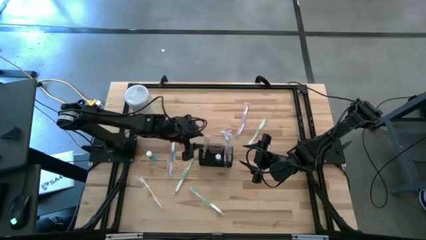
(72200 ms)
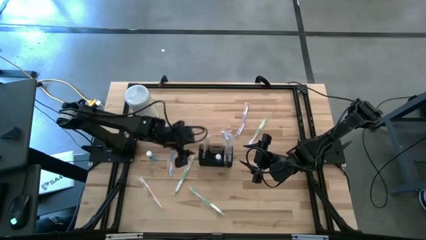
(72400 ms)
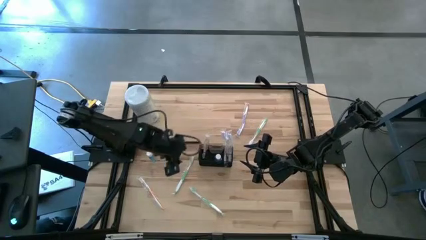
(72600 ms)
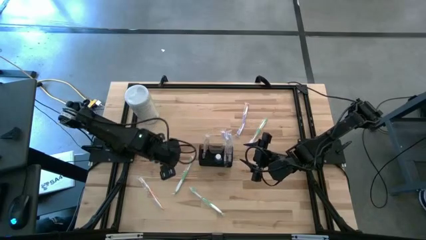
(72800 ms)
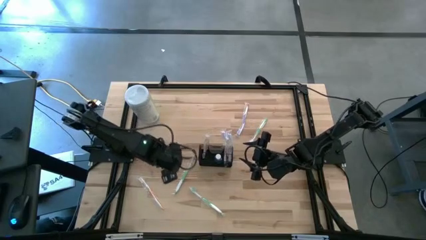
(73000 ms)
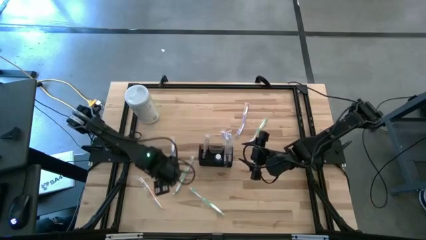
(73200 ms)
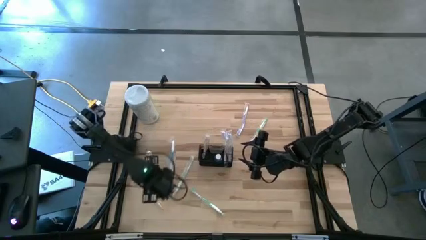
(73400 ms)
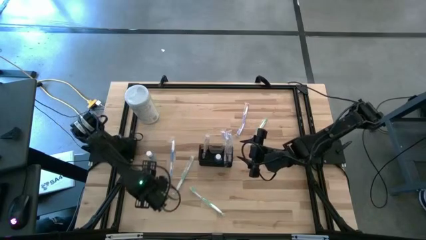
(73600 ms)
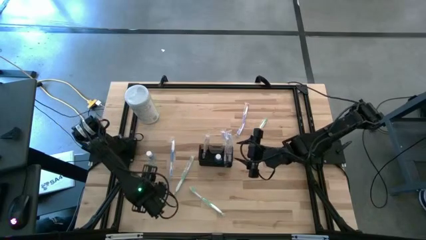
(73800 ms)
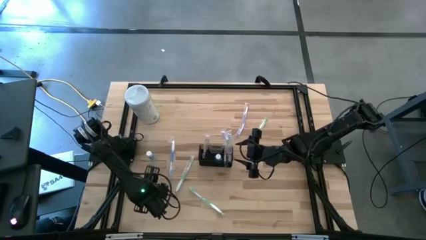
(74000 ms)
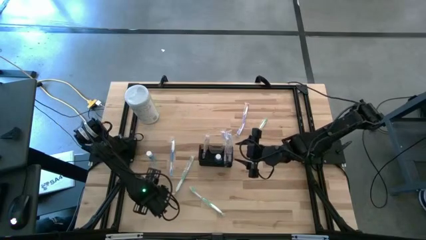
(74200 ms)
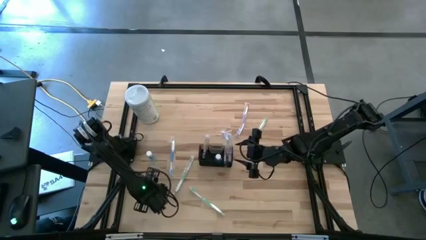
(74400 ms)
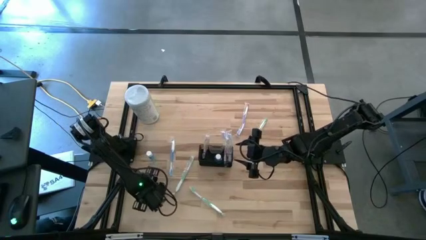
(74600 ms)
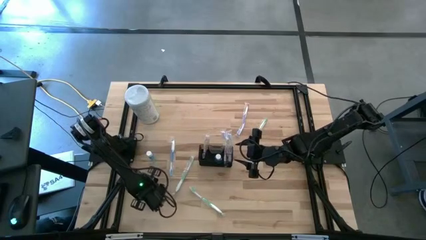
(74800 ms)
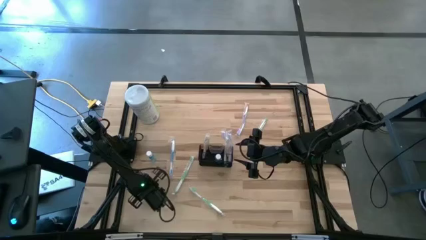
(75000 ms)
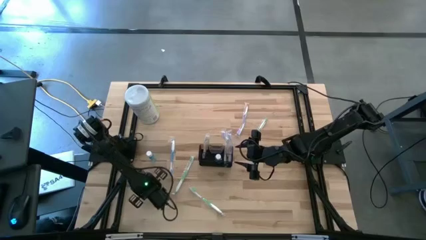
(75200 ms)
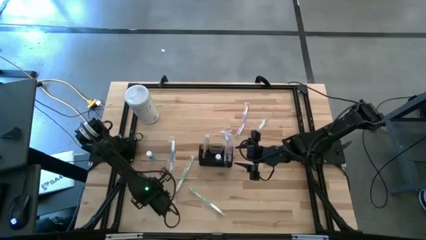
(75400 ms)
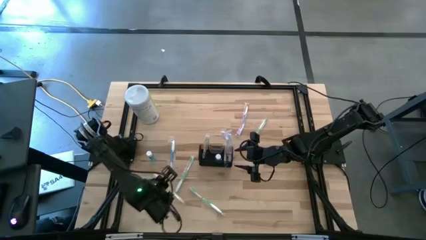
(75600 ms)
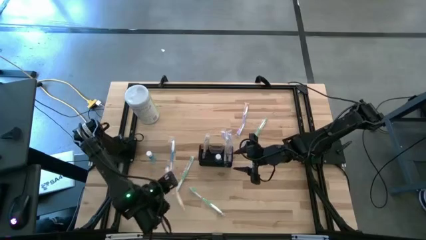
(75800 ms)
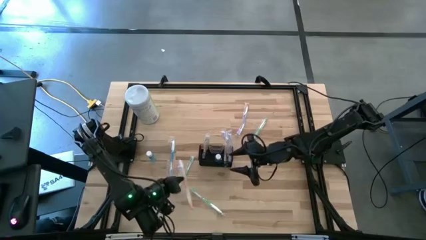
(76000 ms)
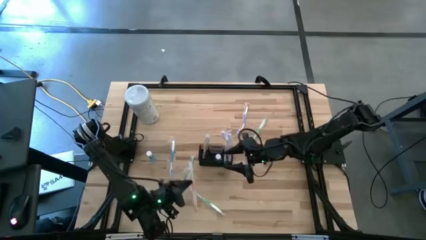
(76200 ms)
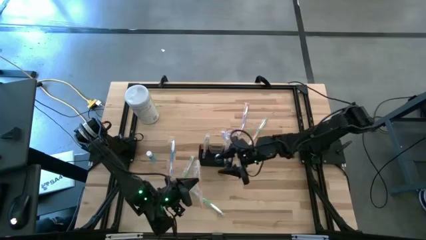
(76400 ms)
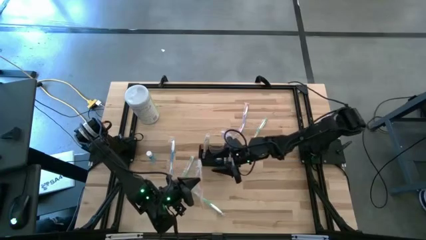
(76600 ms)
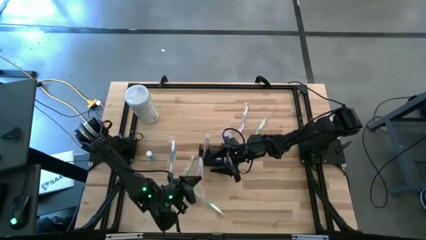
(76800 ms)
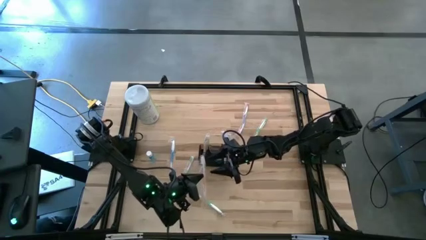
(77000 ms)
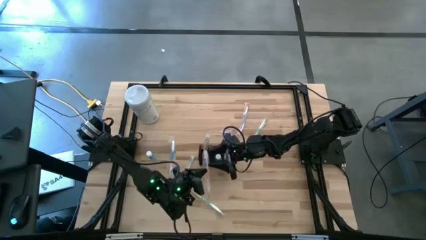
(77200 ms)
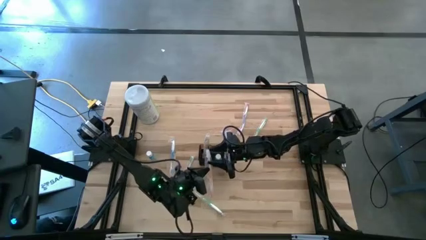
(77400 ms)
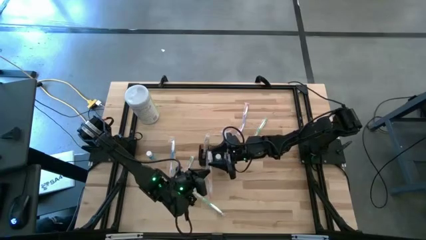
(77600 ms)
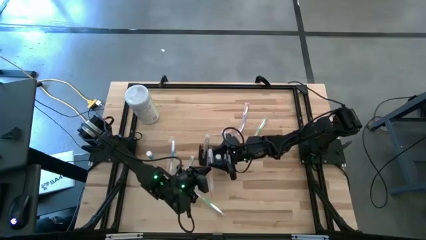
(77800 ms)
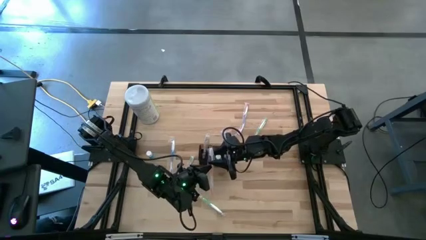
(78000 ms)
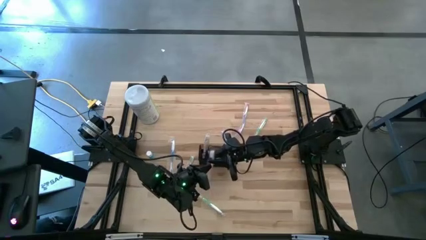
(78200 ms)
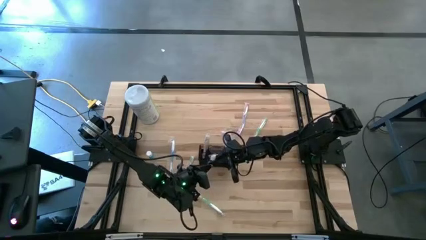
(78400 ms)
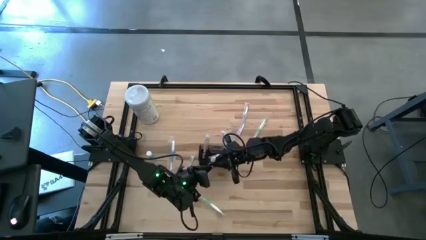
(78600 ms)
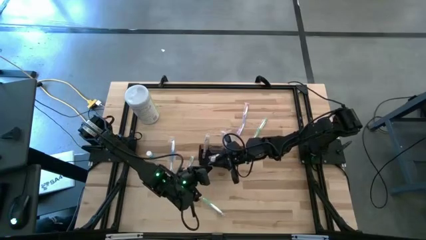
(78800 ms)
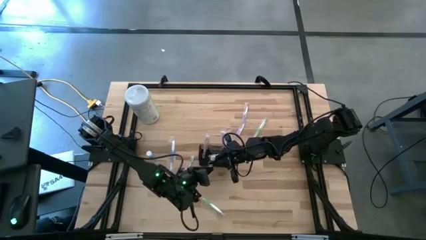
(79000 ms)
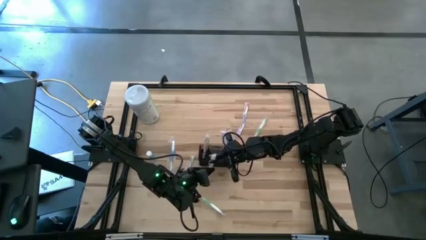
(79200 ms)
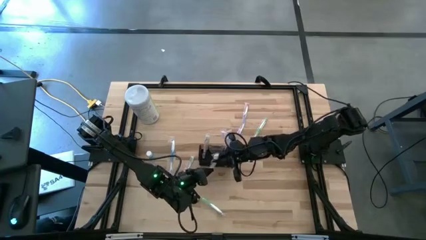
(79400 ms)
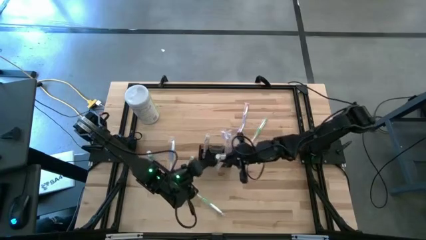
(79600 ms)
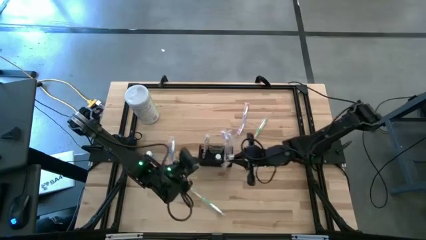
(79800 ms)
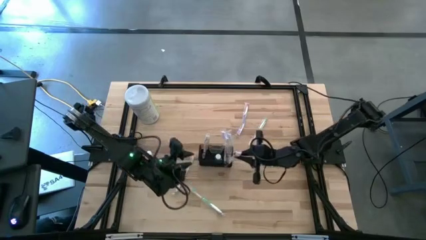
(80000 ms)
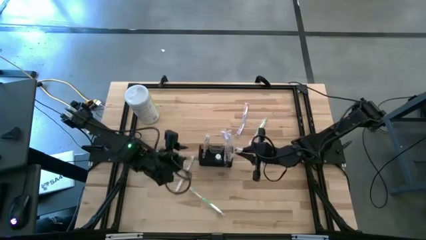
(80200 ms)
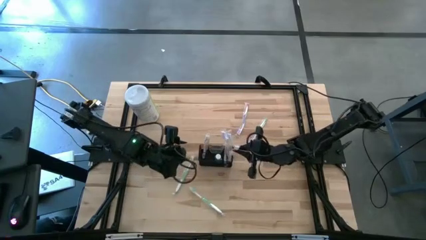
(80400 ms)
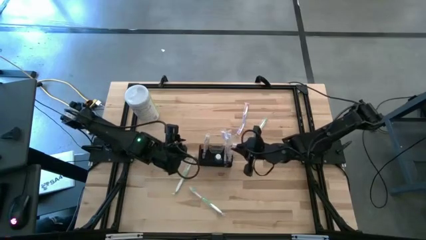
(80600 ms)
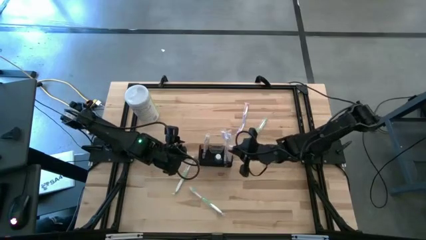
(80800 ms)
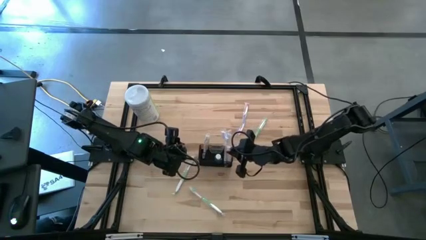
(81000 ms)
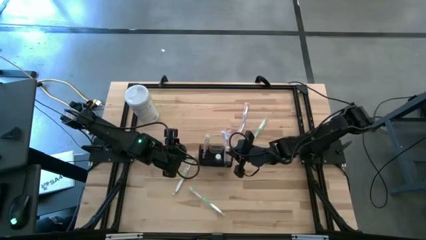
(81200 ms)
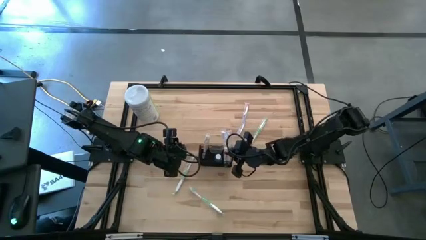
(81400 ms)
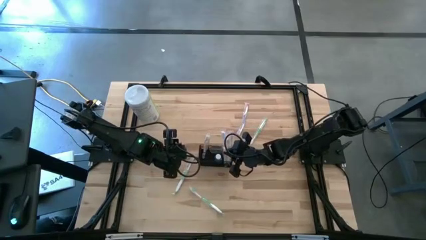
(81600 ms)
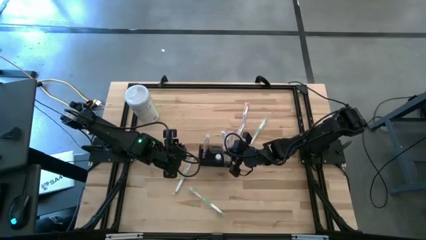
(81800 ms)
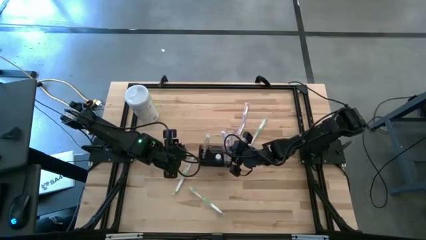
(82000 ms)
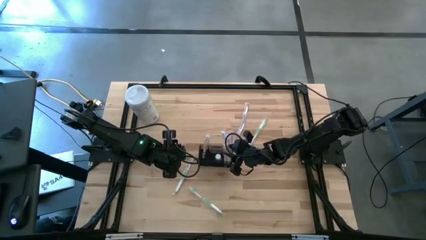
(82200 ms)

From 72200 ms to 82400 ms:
Task: Pick & Place toothbrushing station
Put the orange toothbrush into the black mesh
